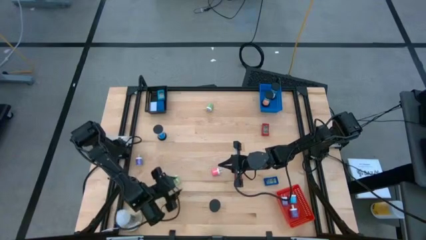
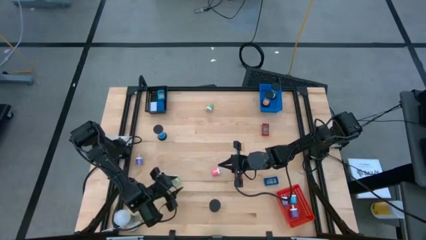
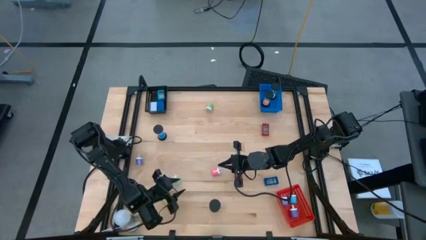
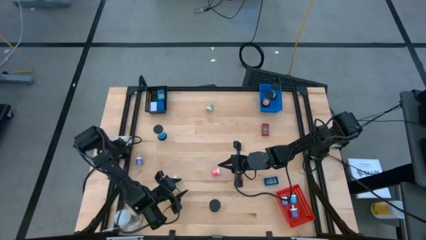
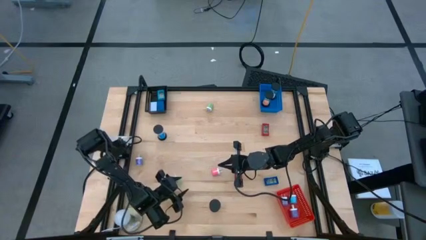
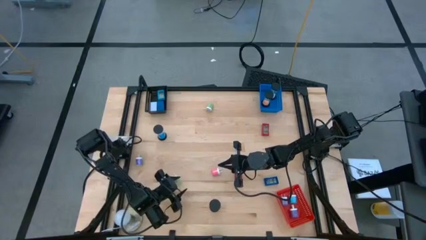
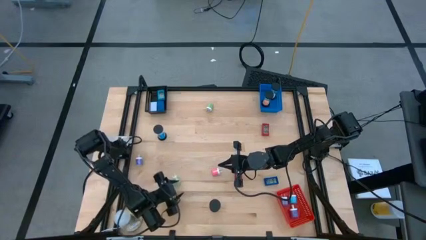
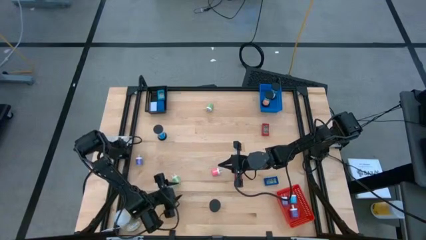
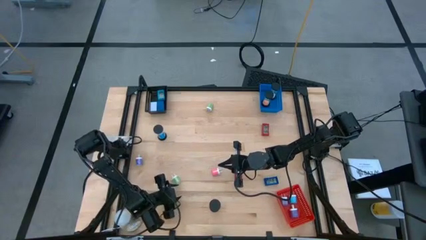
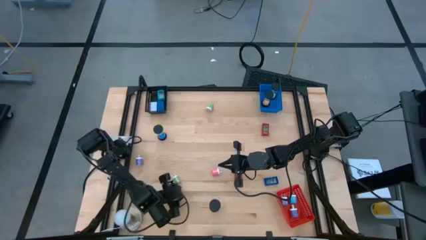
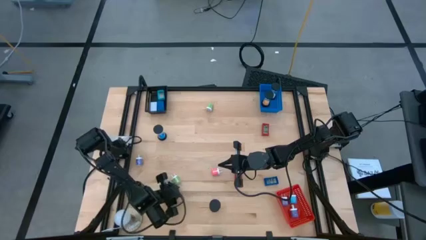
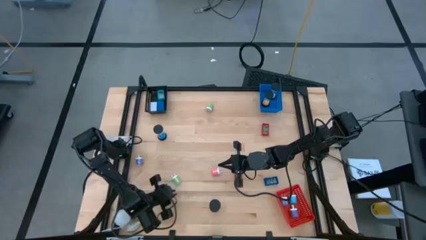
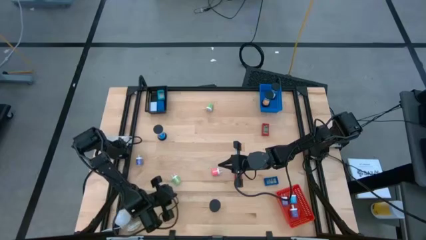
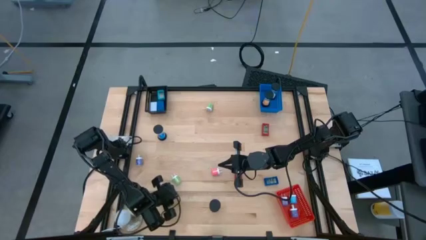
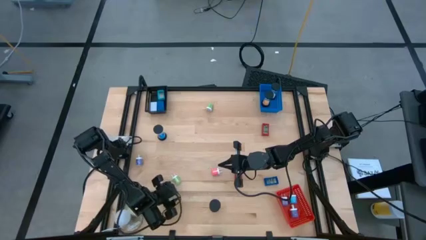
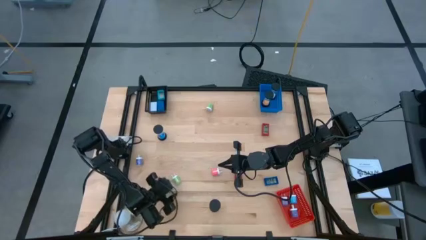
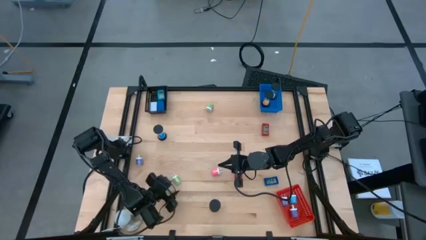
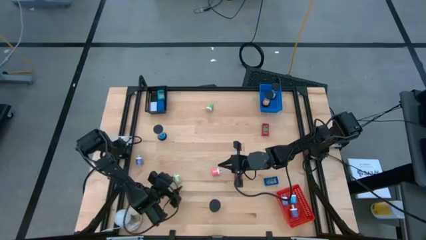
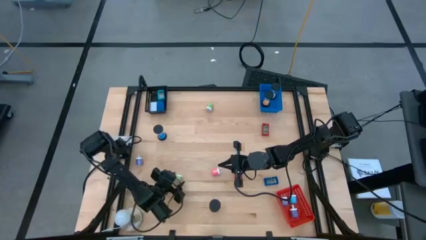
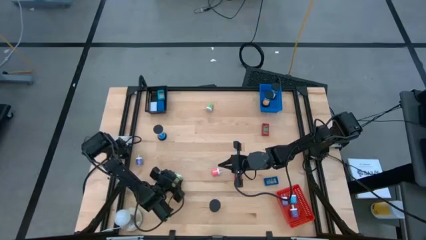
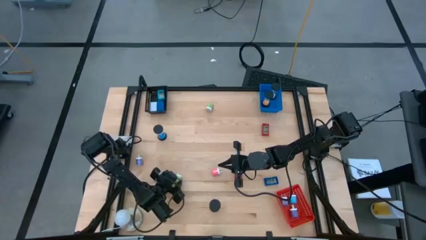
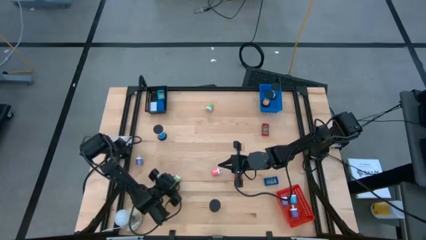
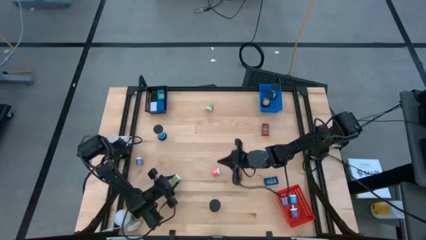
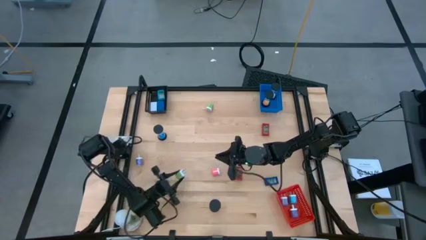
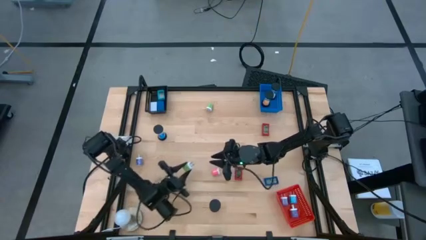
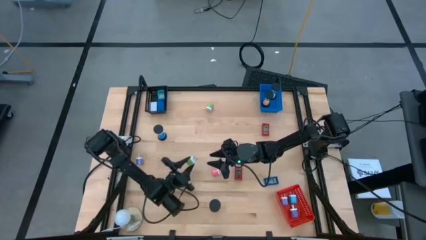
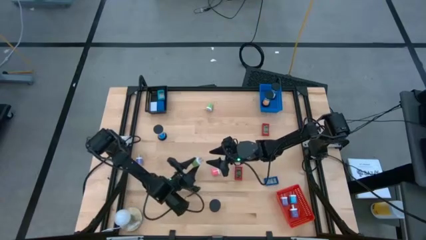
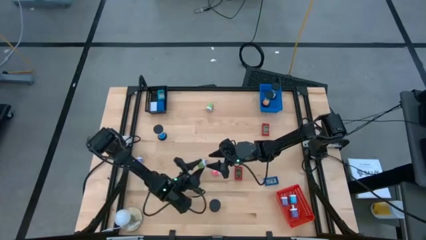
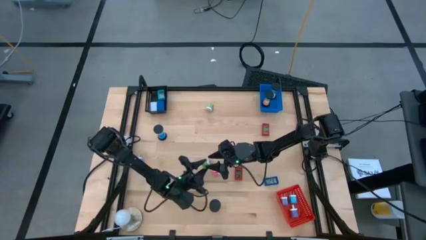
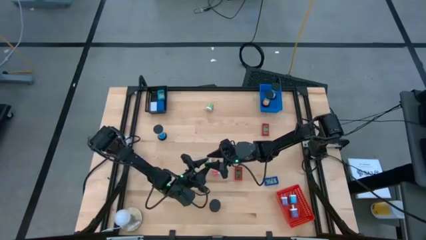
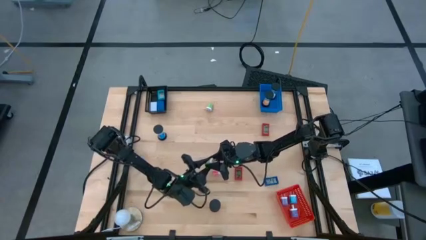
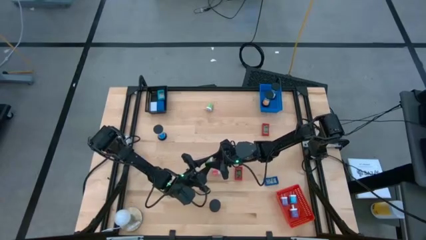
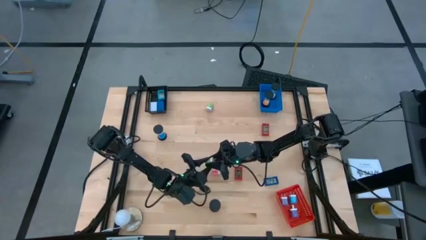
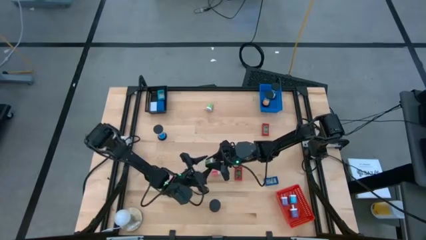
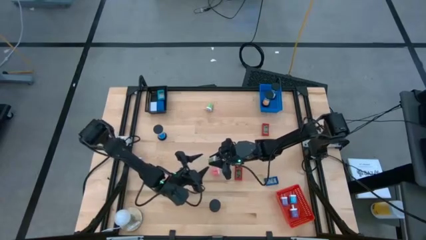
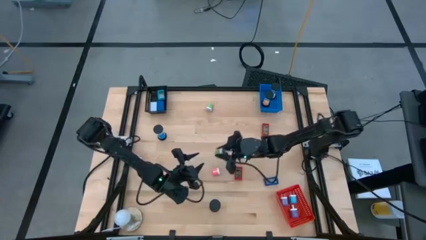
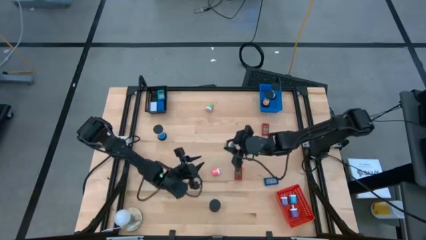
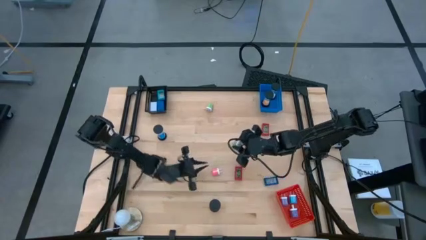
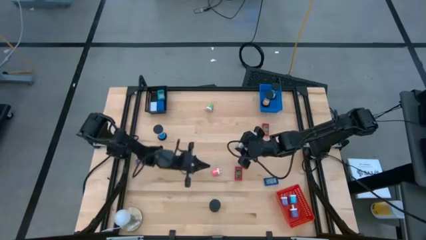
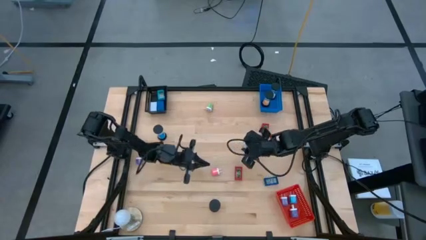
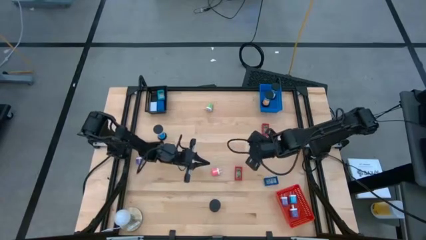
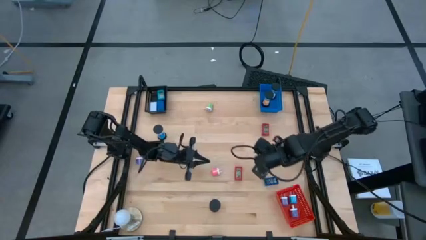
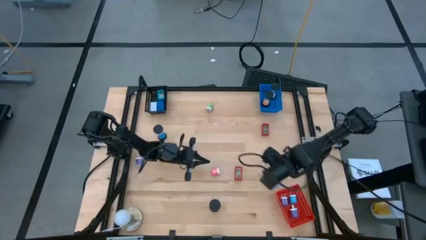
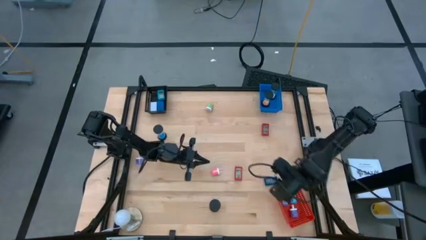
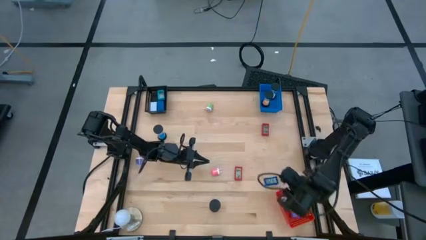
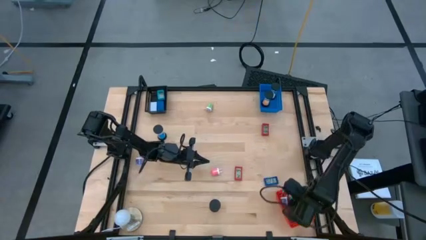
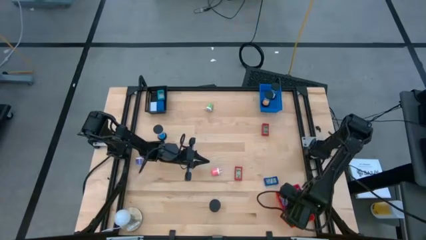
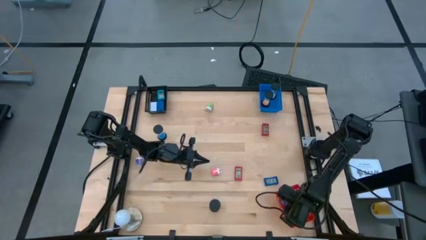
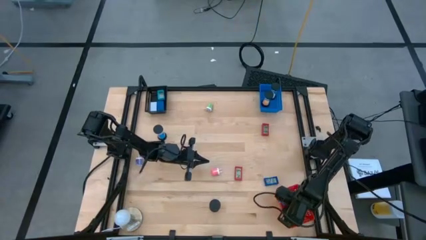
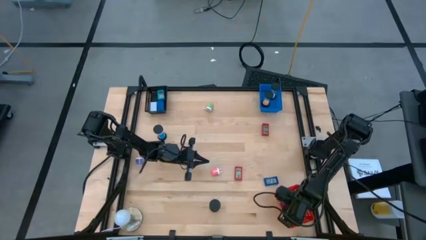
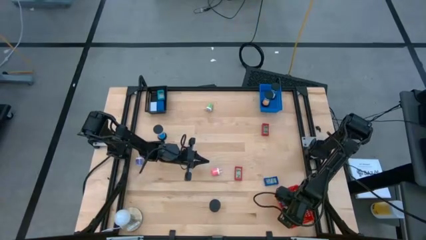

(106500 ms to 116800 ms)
Task: Pick & Place Office items
Put the bottom green charger adapter into the red basket

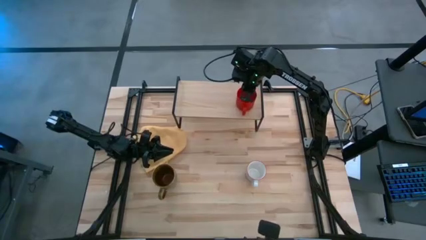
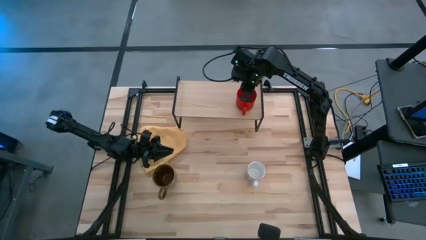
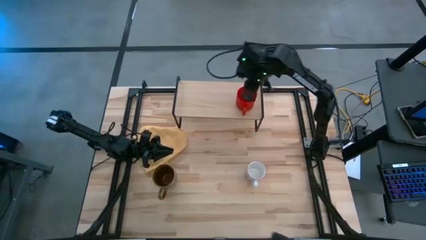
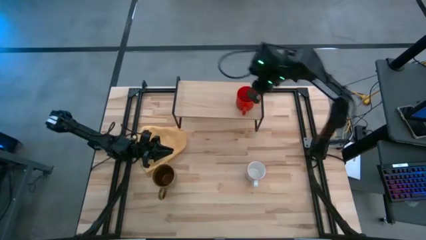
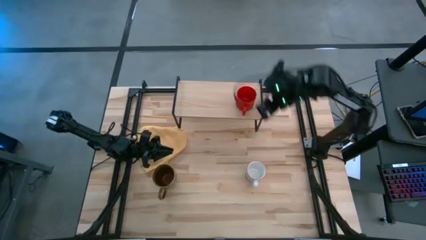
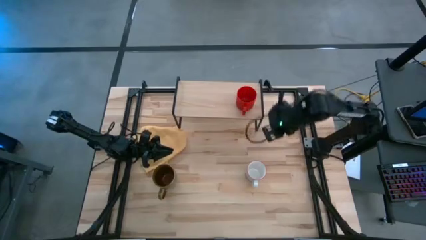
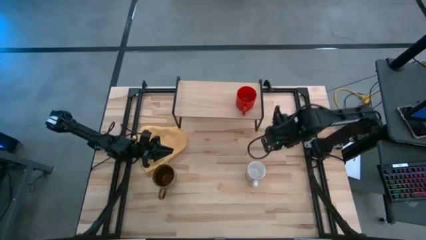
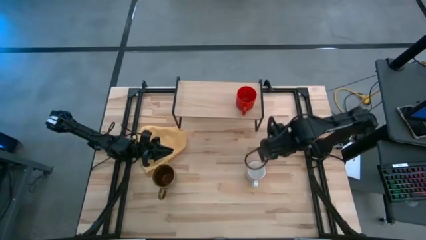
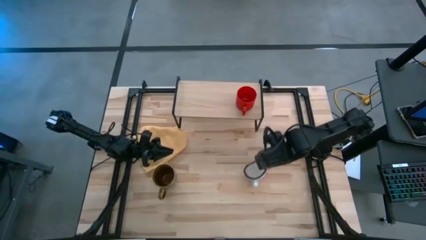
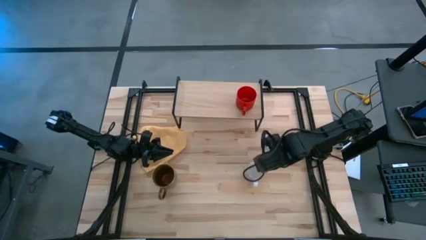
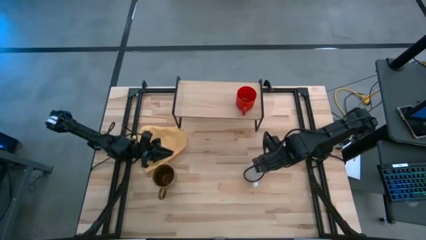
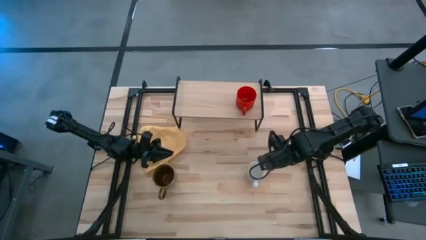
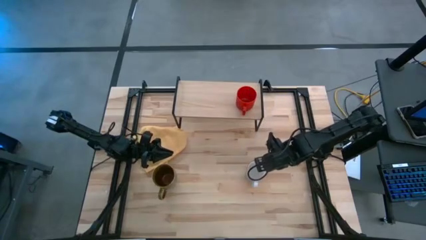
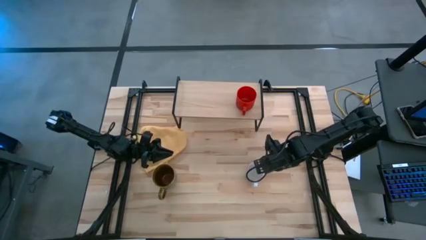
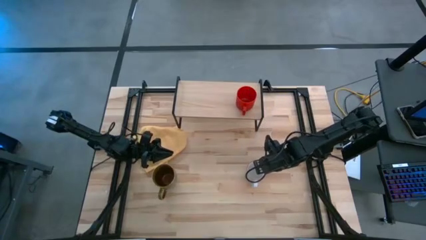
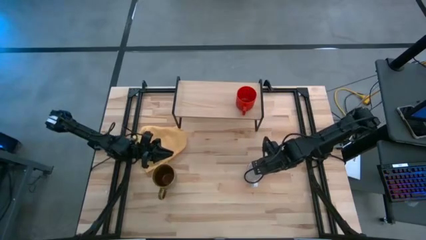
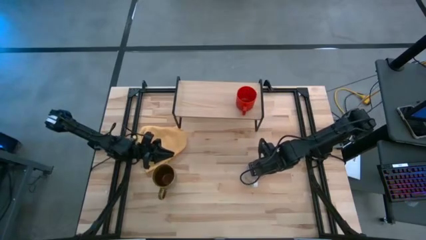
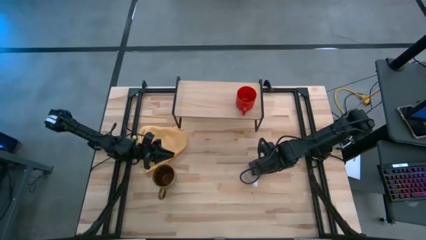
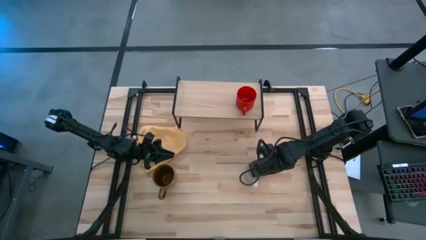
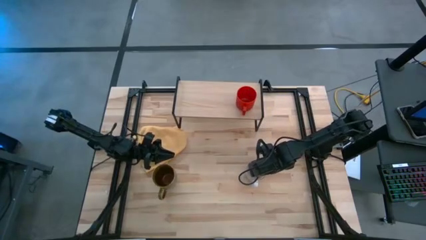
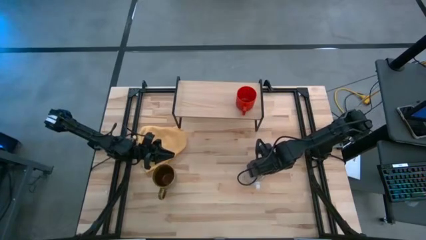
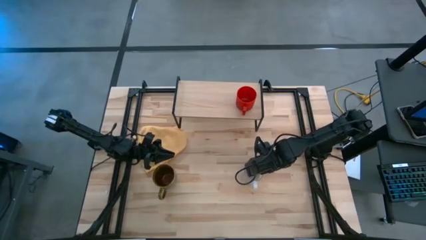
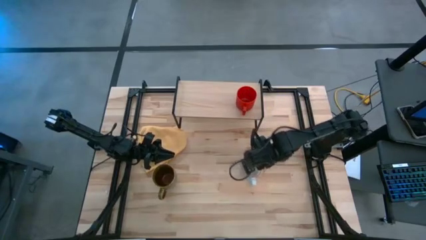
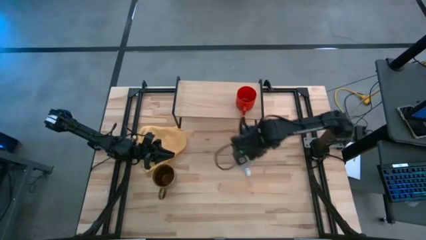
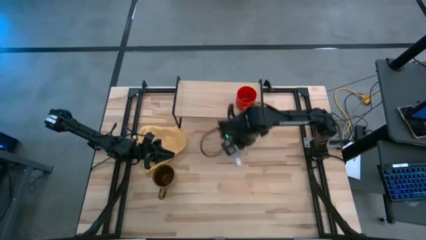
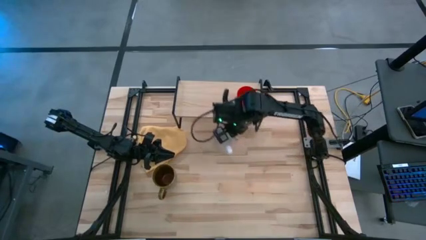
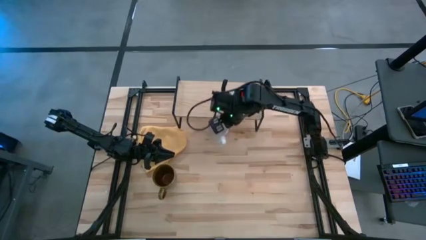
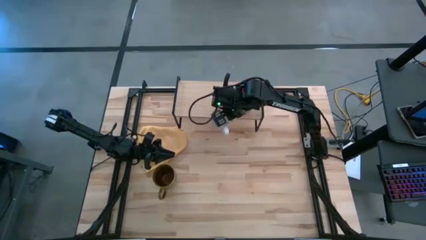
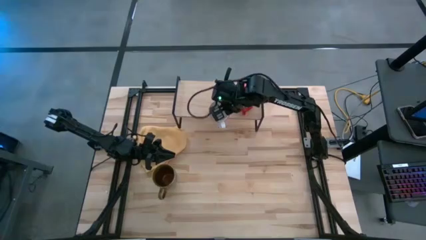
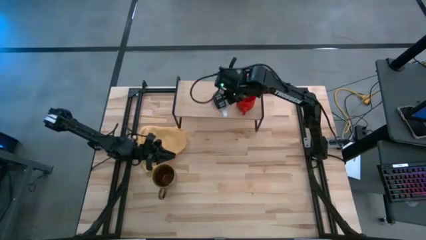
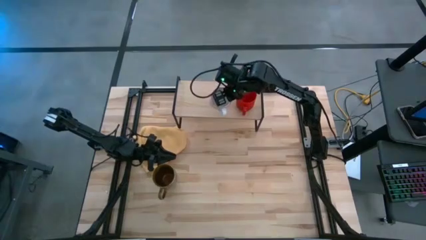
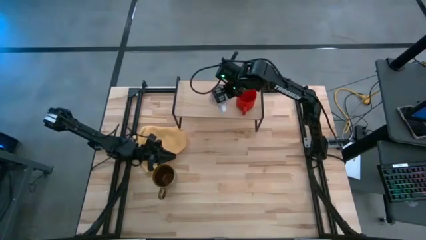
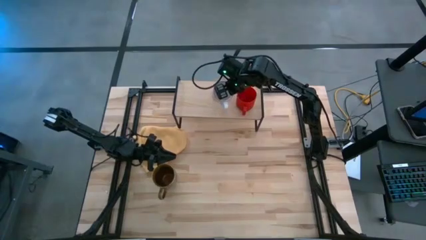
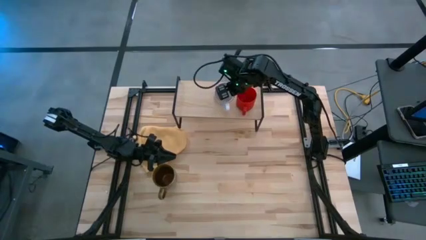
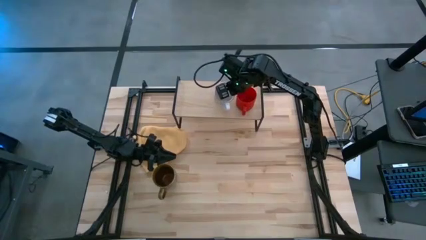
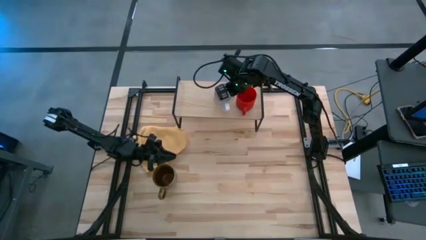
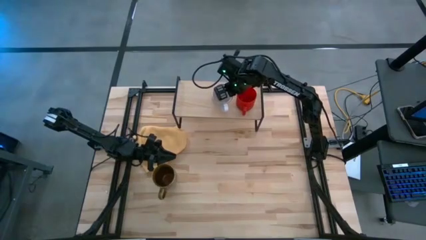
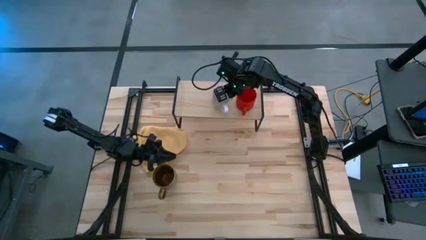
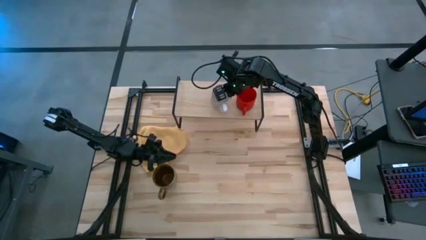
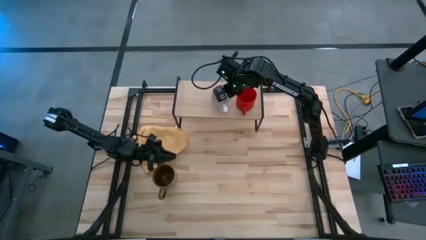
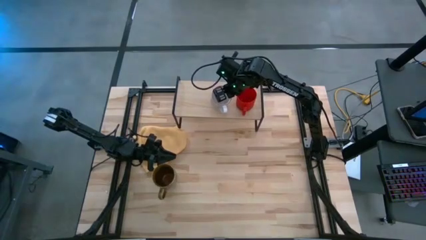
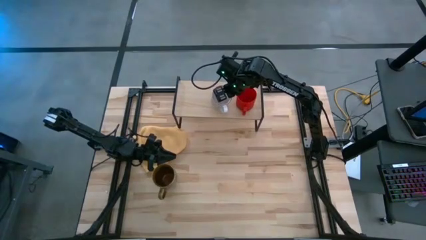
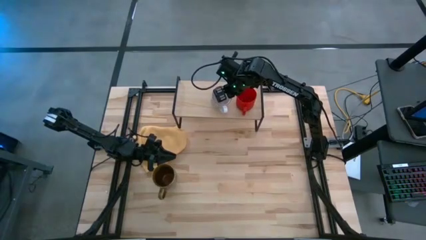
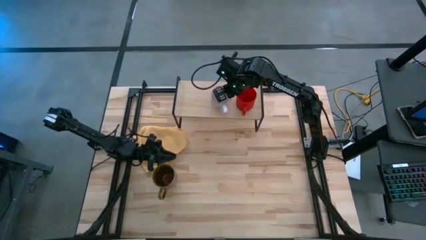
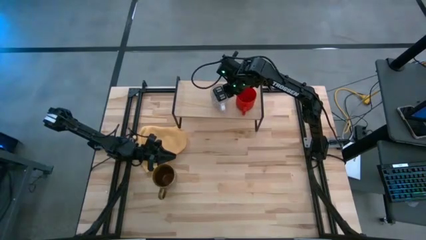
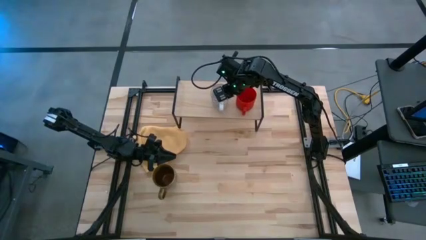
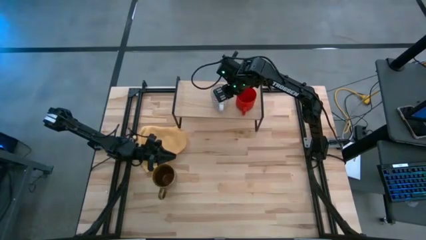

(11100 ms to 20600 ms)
Task: Stack small to large cups/mugs on shelf
Put the white mug on the shelf
